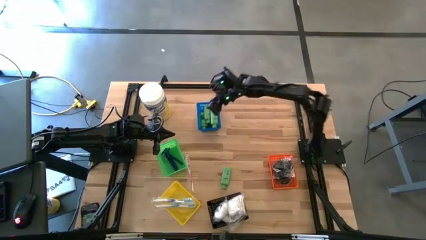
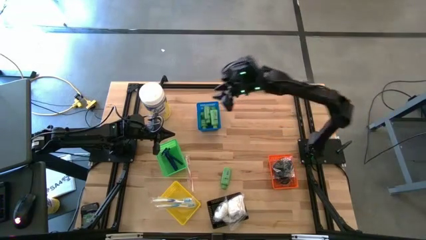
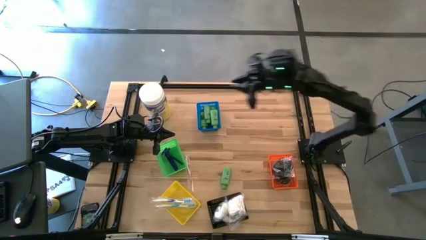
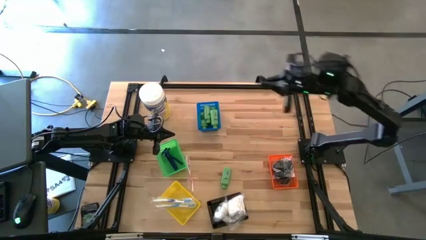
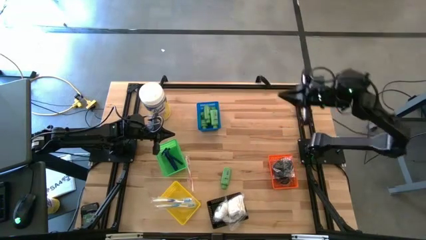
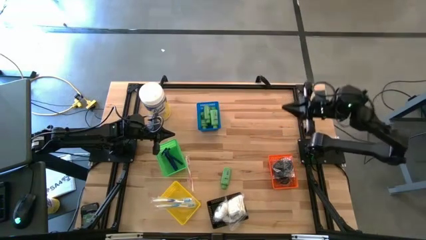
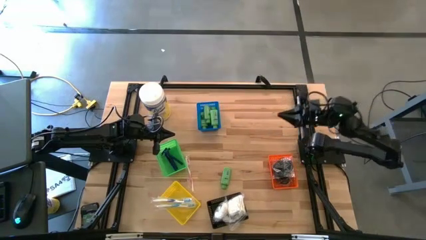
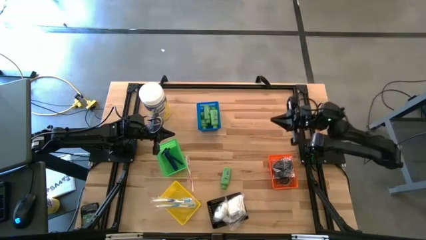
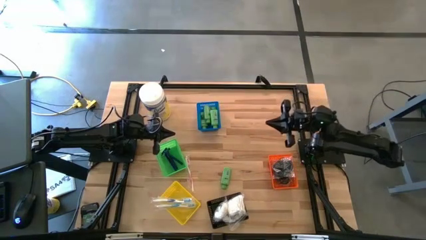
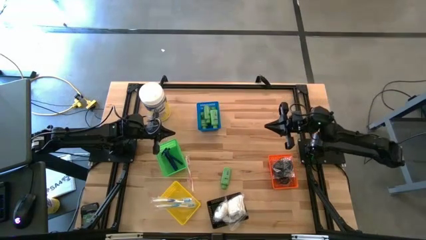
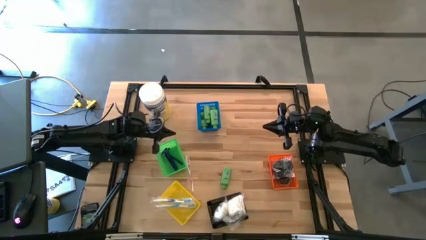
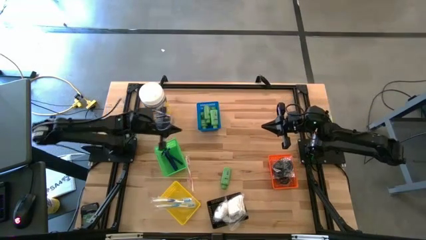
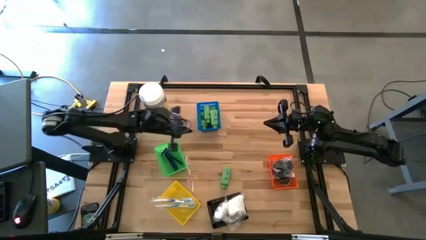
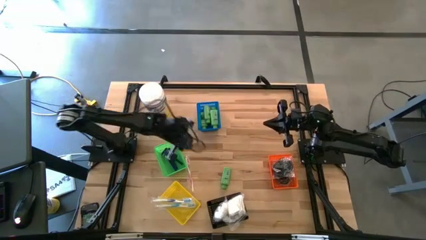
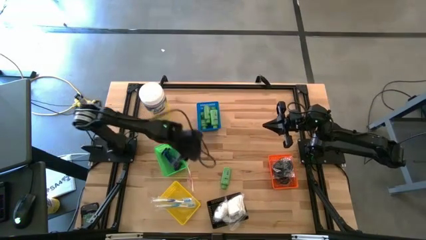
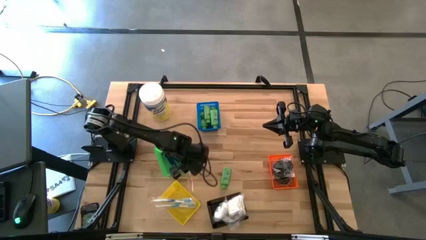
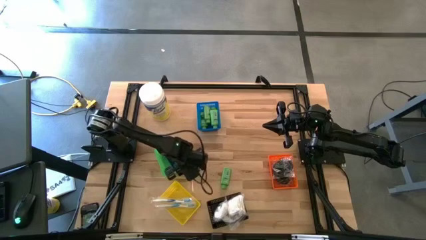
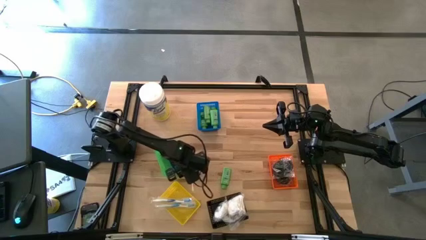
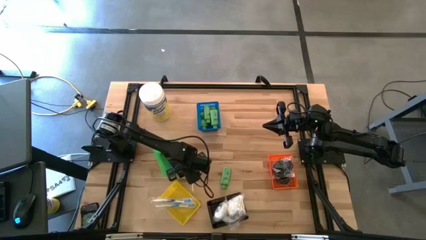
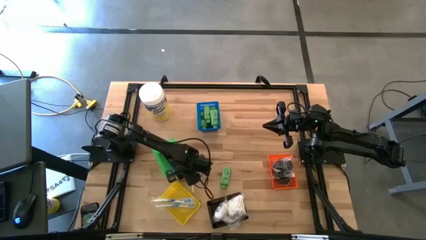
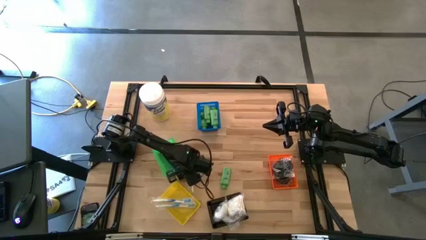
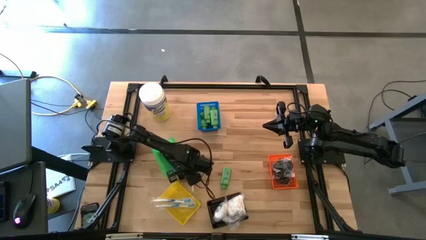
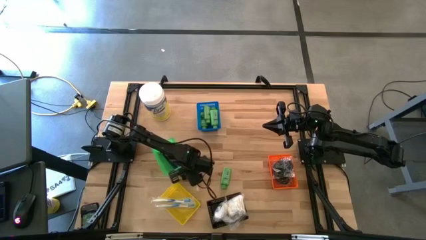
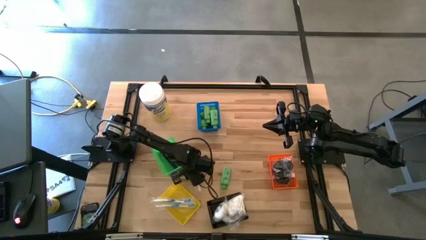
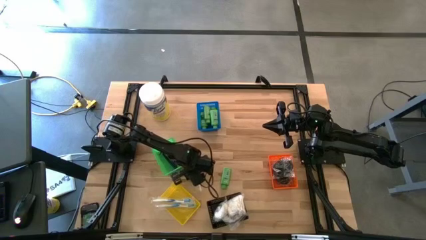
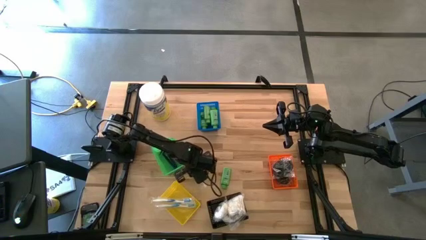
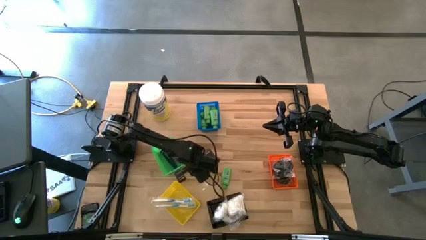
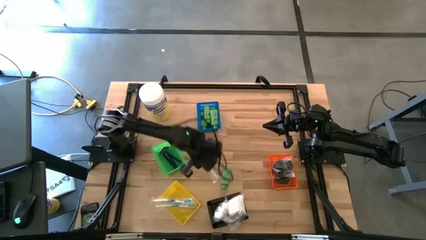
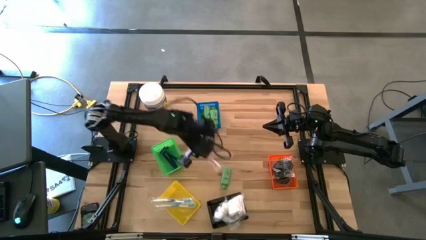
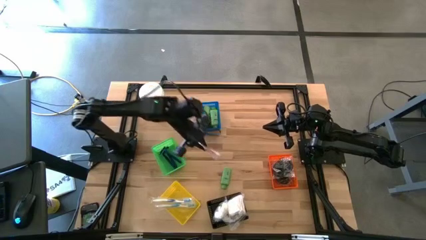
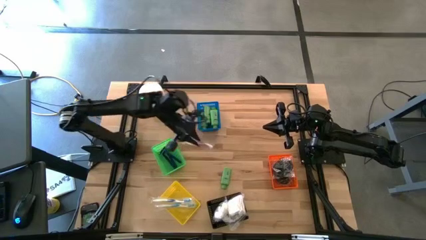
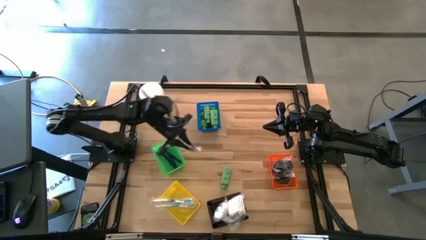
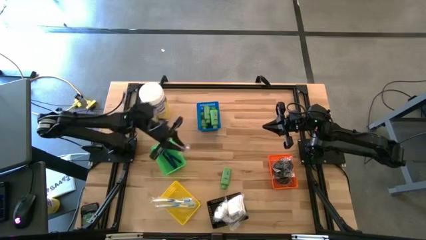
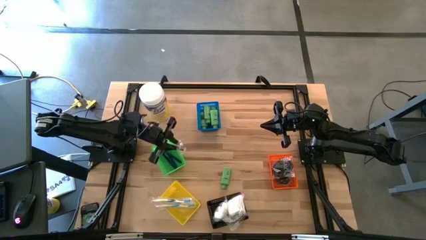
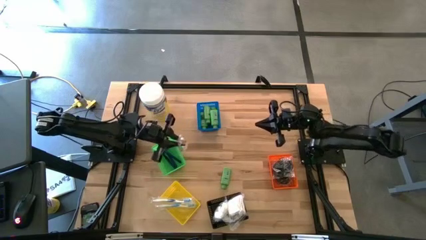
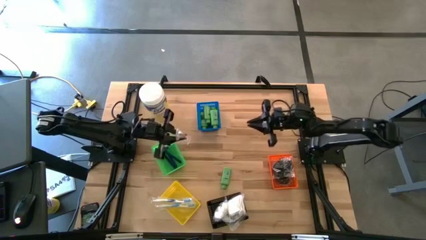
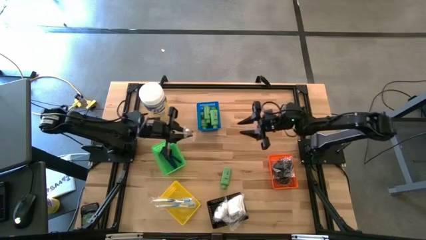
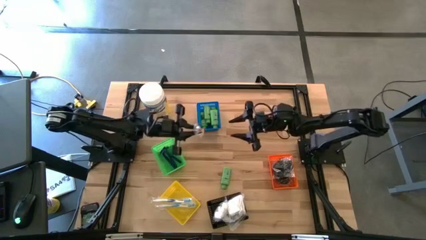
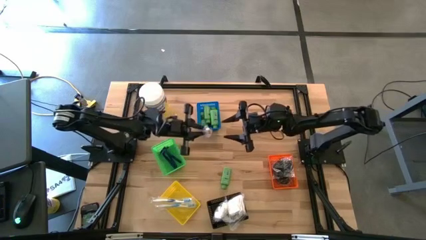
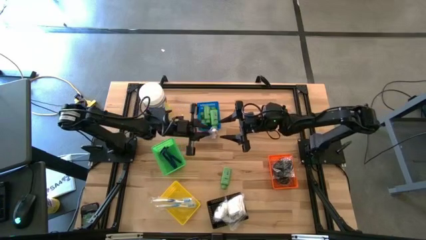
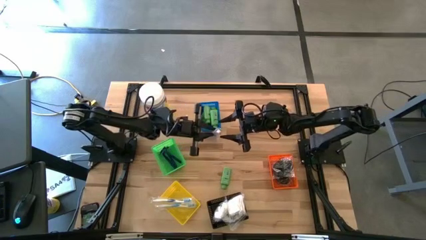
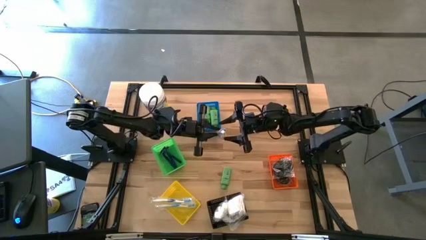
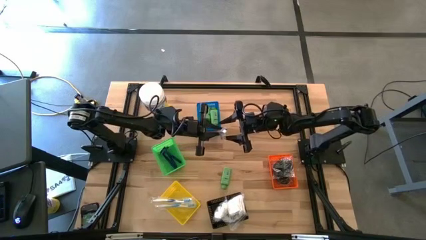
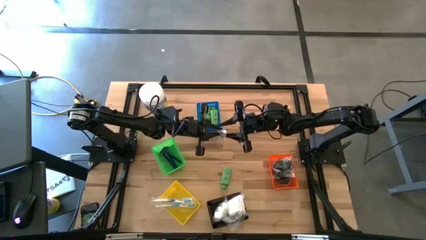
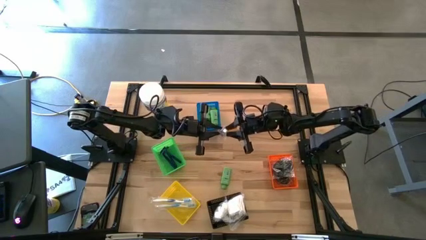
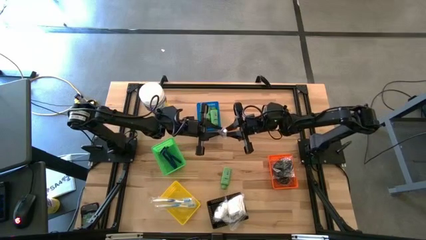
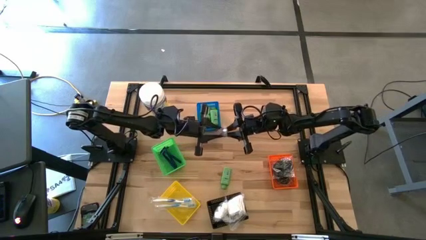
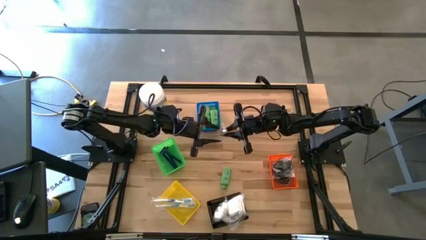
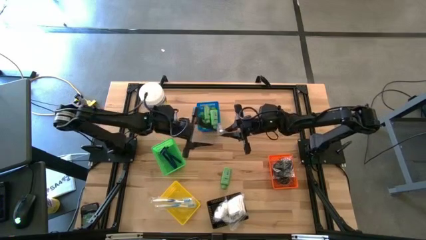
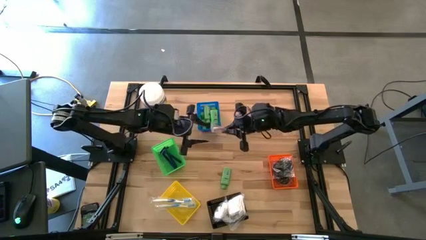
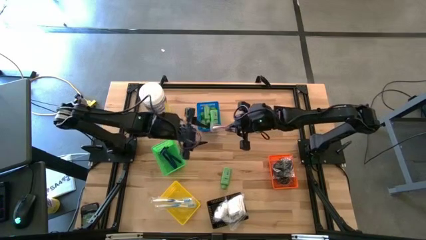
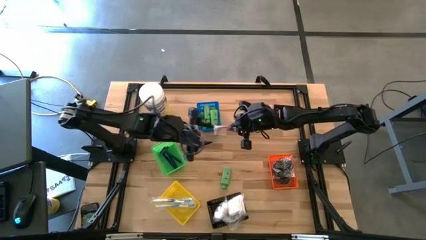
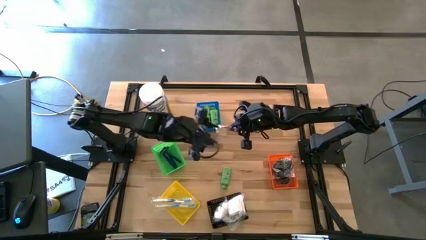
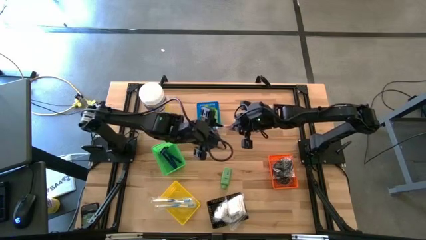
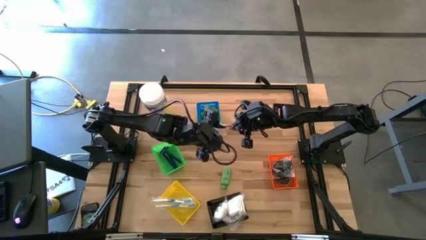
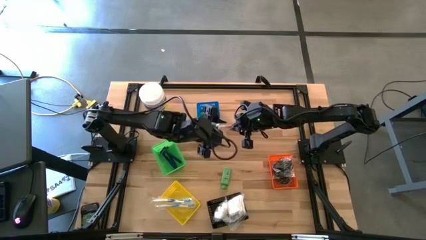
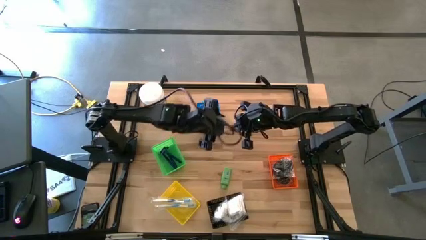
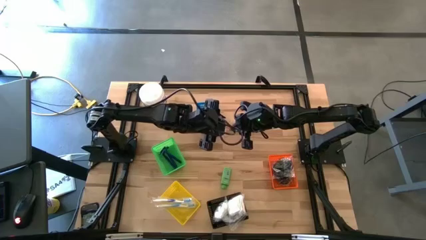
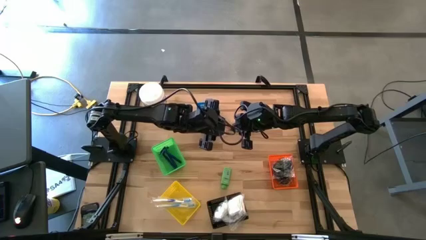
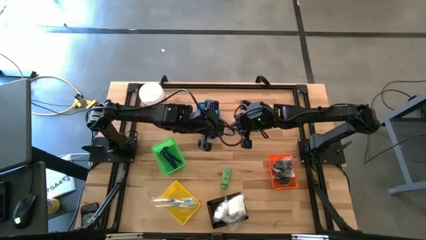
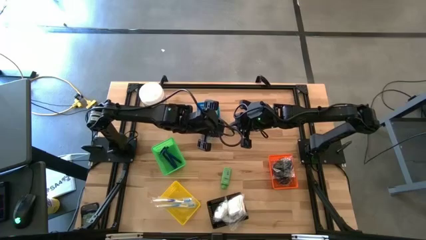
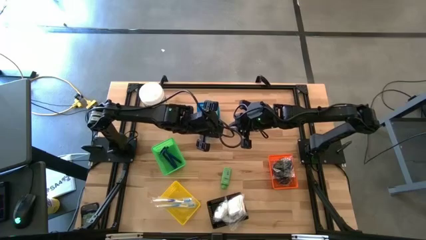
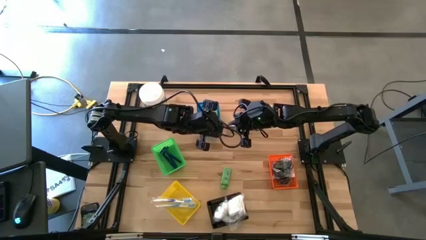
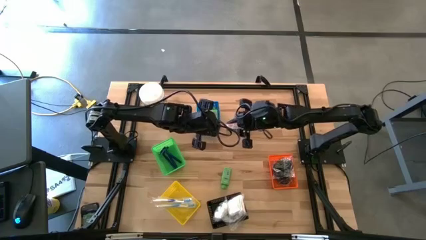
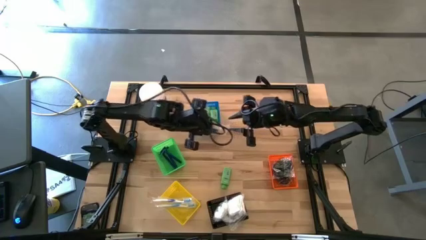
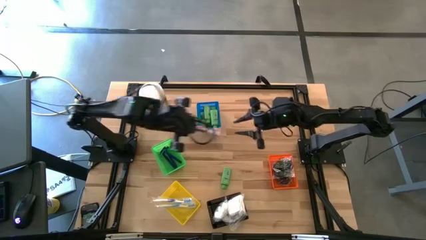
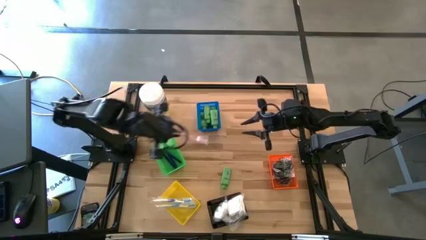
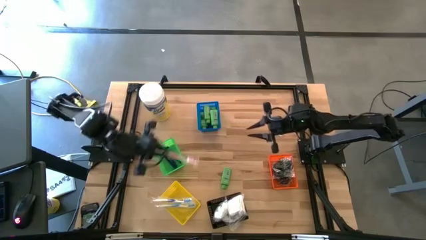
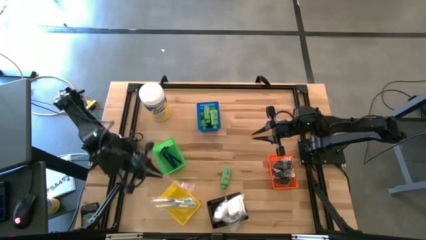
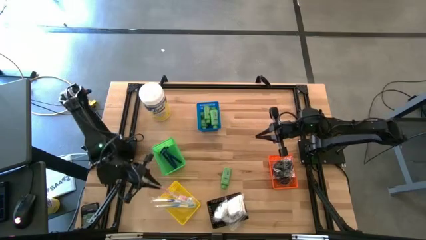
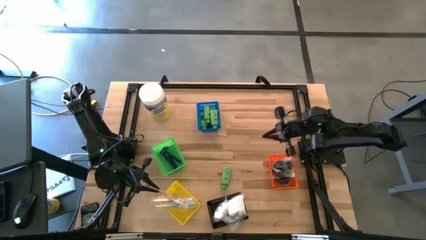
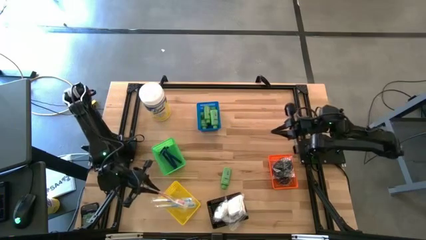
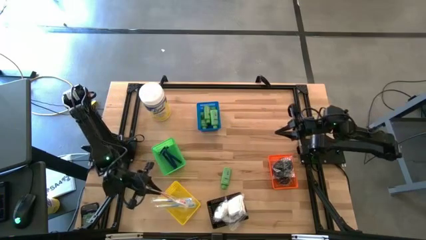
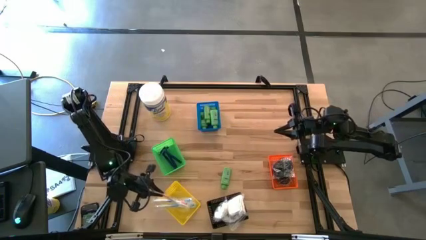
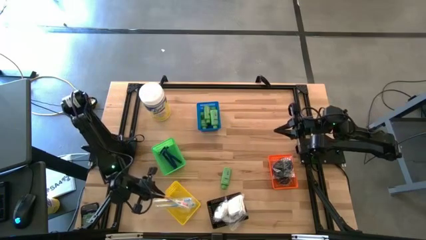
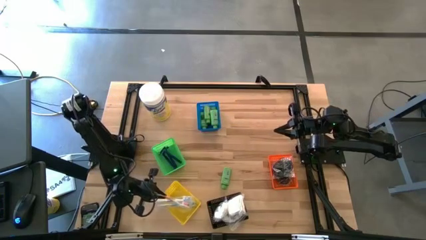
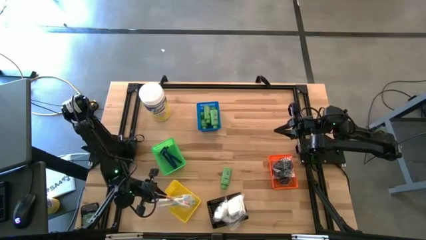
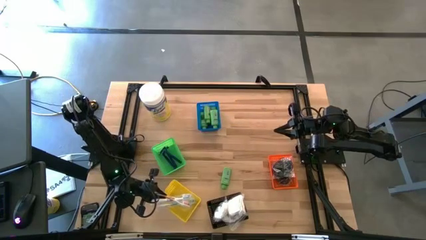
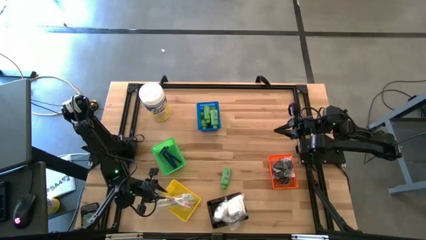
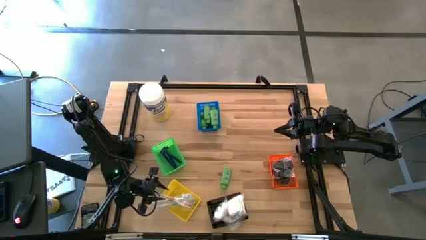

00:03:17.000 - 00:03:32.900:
Task: Pick & Place Travel size toiletries
Put the red toothbrush into the yellow bin

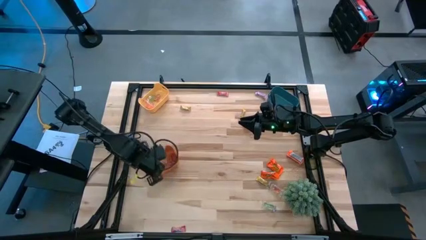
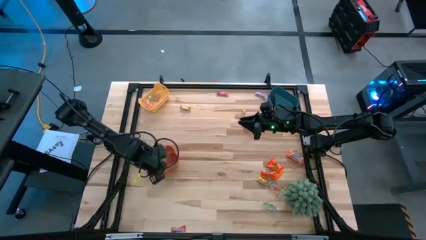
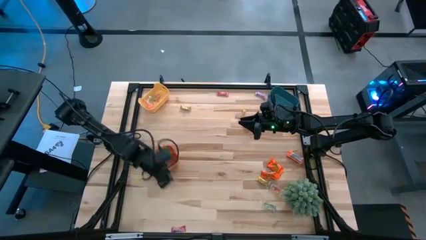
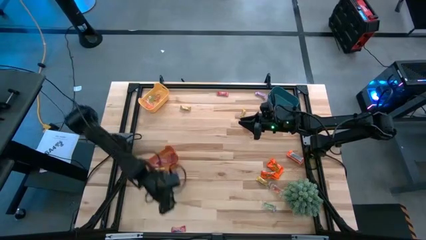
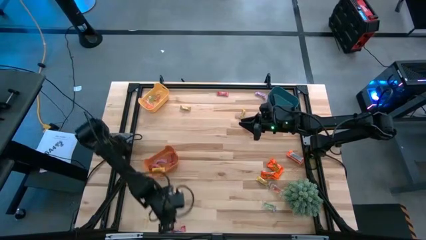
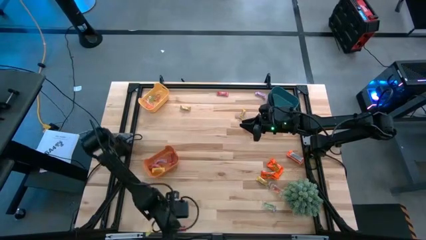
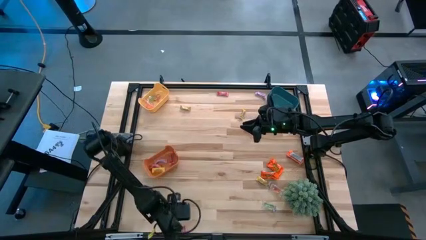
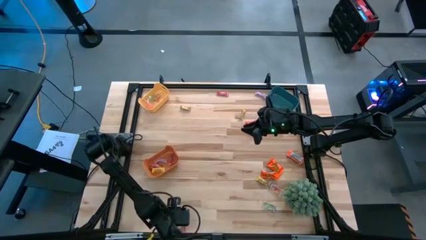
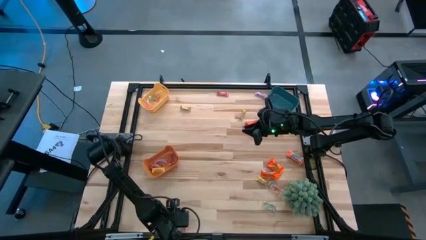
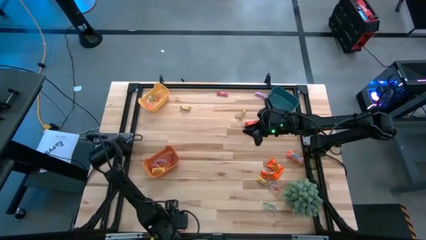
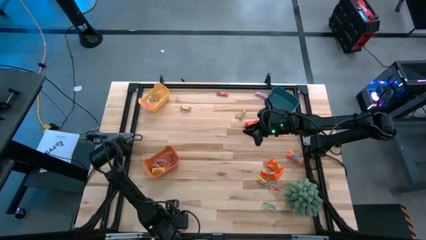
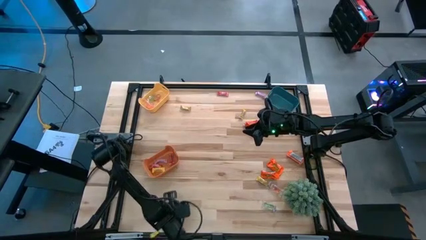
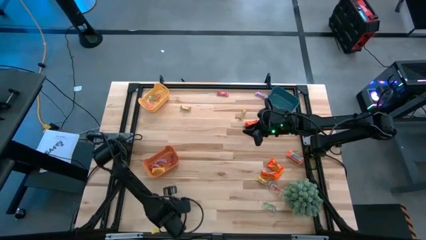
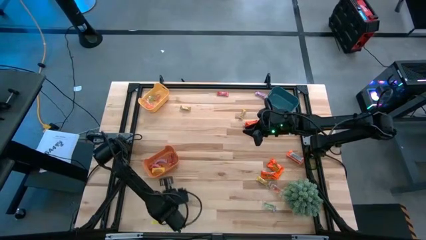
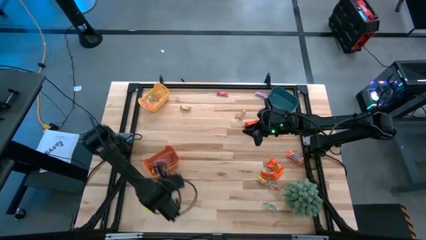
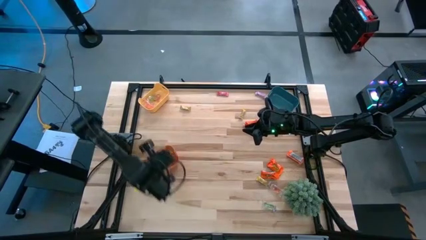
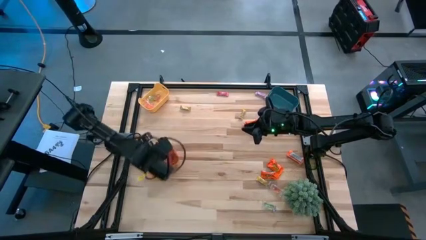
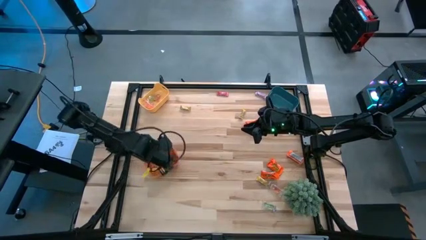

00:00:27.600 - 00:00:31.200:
Task: Sort candy
Put the bottom red candy into the orange bin
